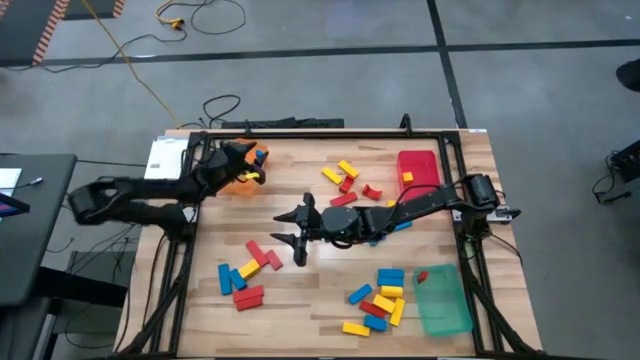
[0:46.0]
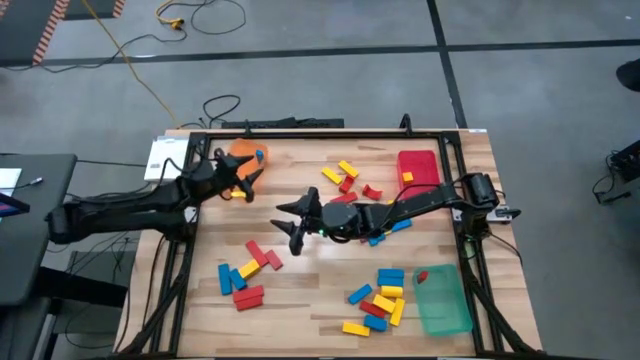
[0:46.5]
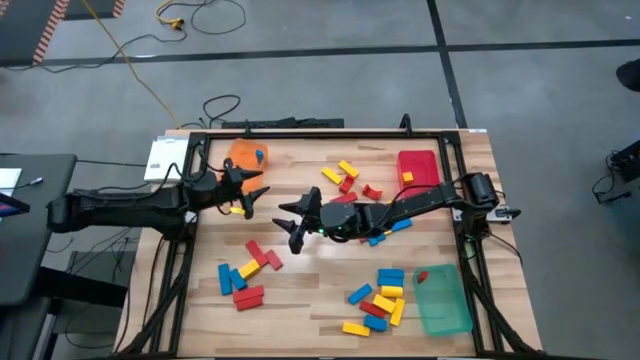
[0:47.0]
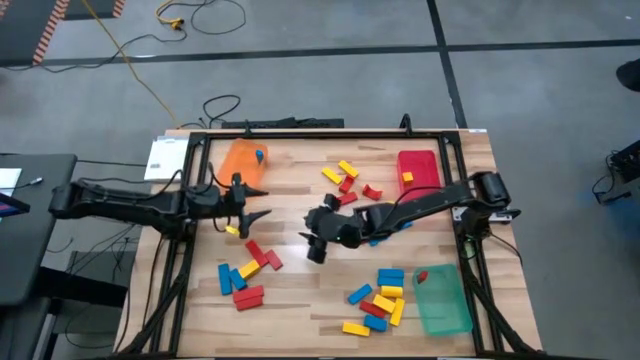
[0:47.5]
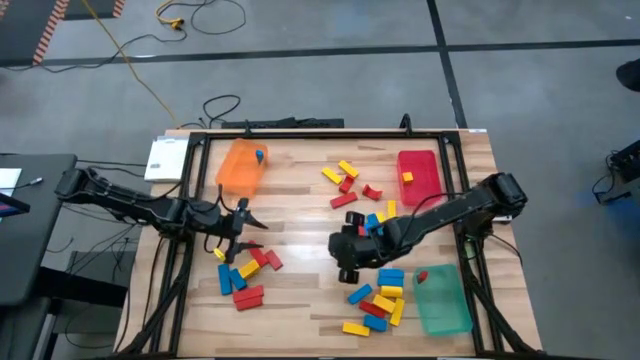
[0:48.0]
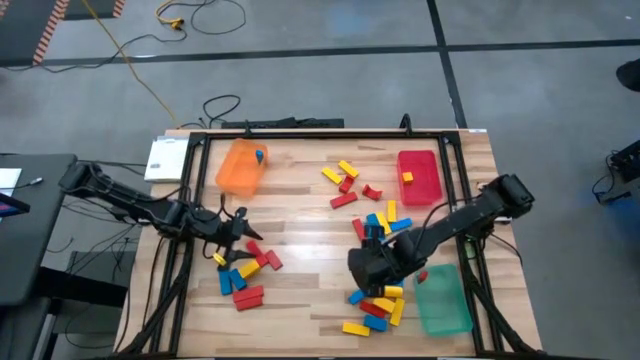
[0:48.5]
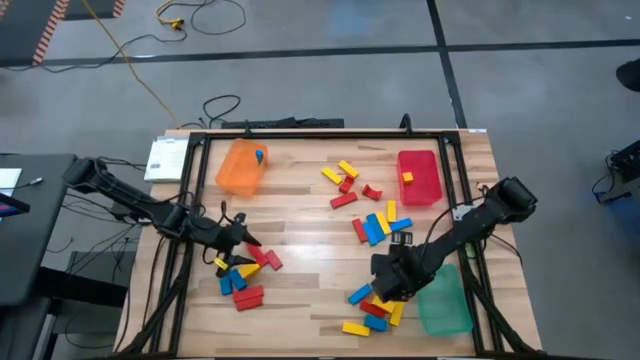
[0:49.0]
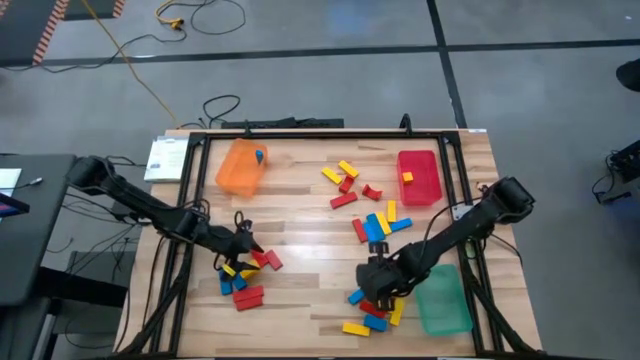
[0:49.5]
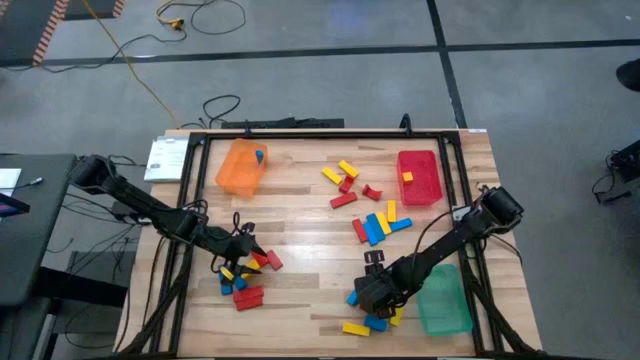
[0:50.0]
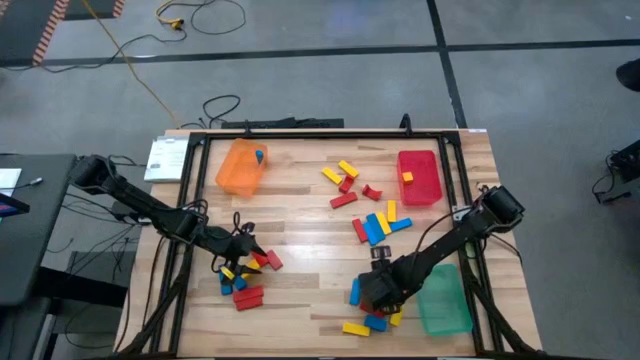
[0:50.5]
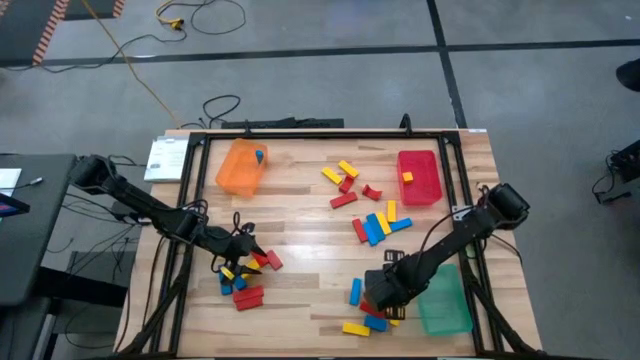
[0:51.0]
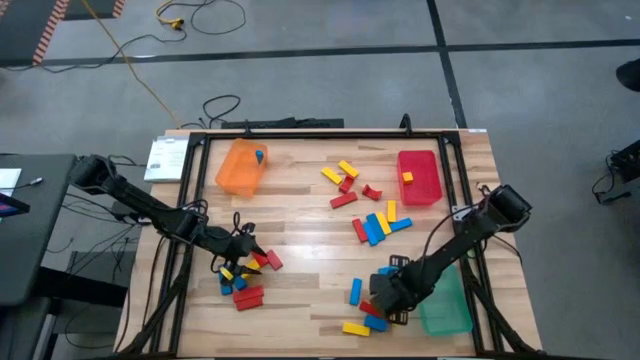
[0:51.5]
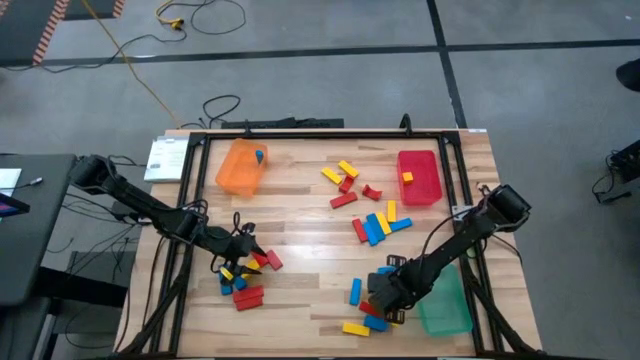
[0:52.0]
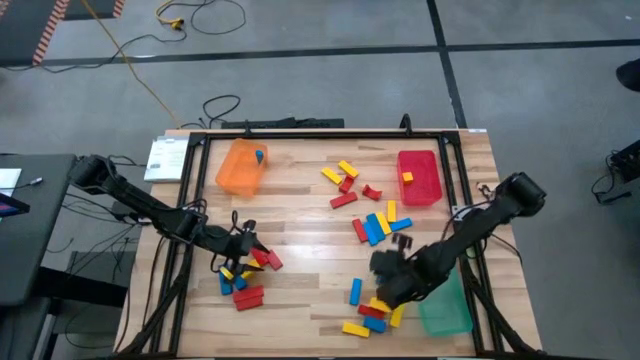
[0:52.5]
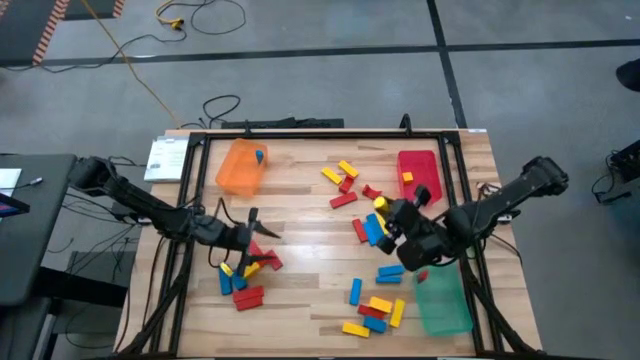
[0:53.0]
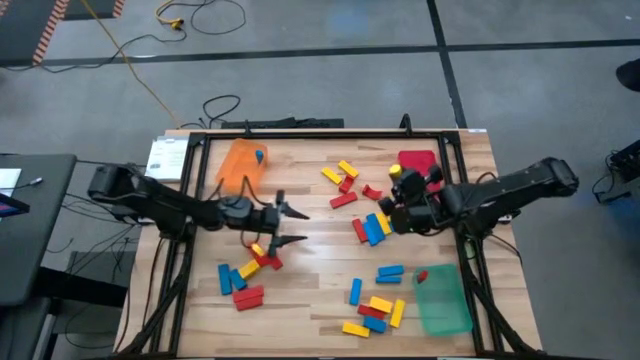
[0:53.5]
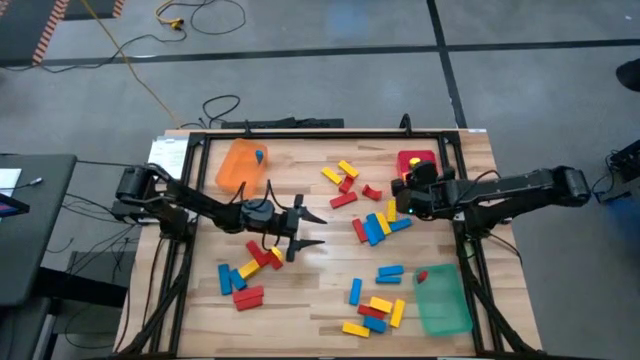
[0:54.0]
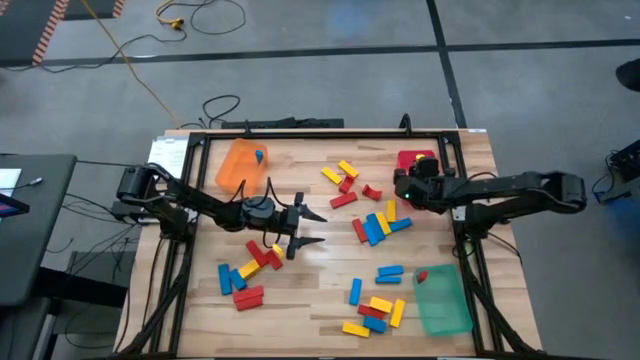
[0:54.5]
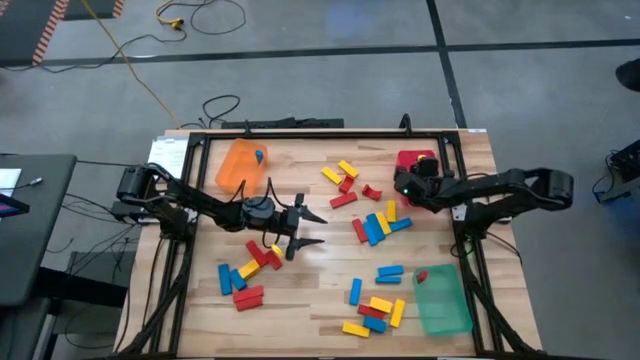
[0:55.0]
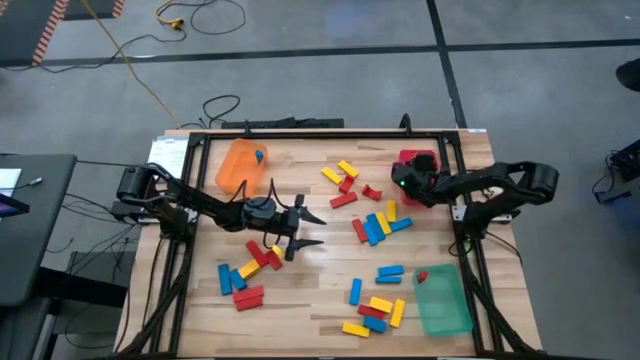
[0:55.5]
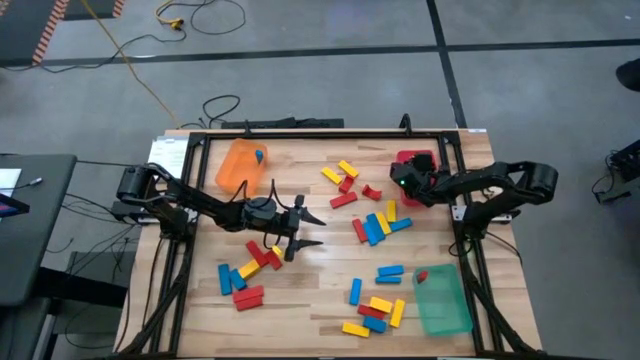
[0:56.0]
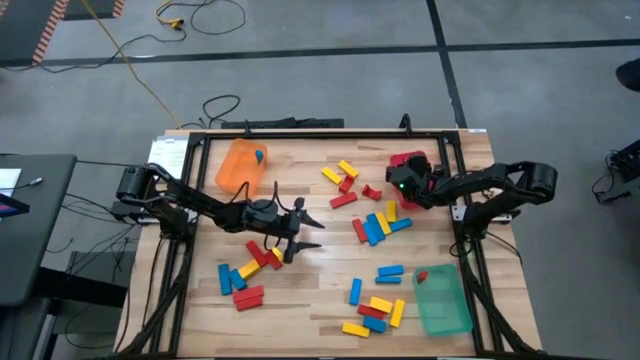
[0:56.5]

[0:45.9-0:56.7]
Task: Sort blocks
Put the yellow cylindrical block into the red bin

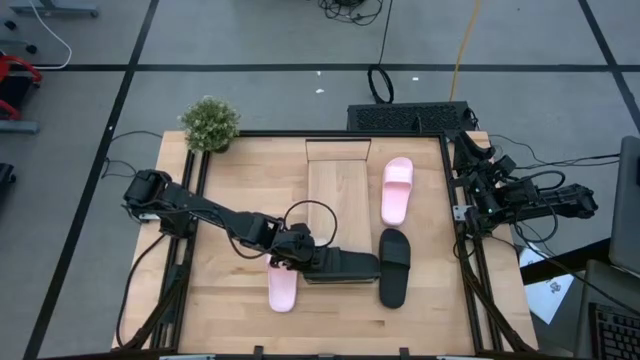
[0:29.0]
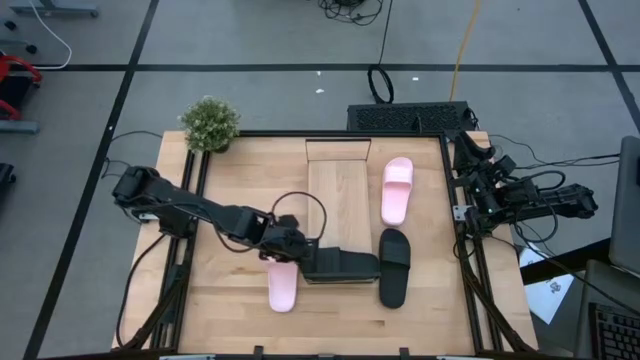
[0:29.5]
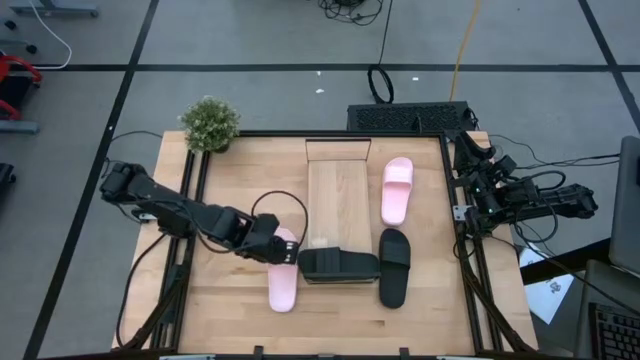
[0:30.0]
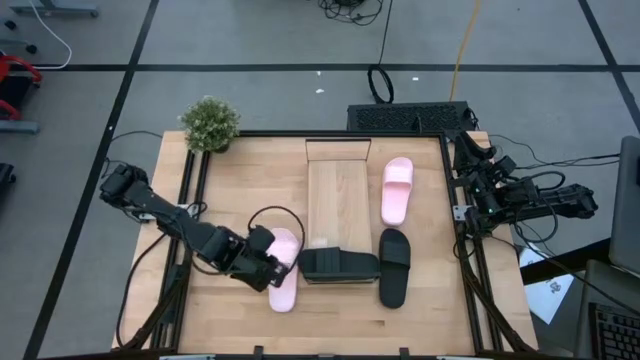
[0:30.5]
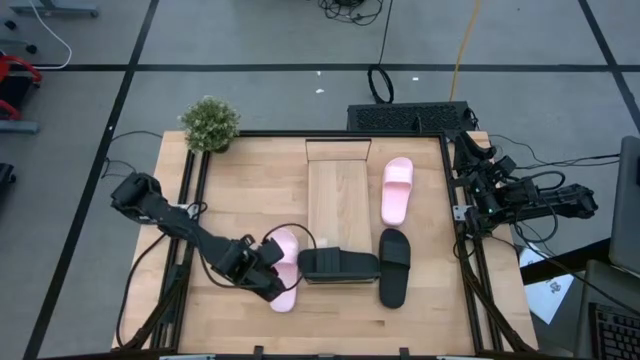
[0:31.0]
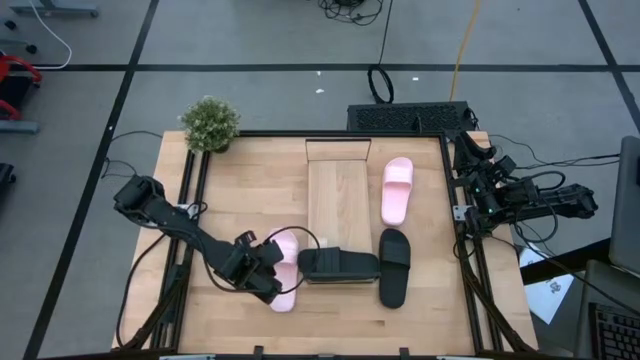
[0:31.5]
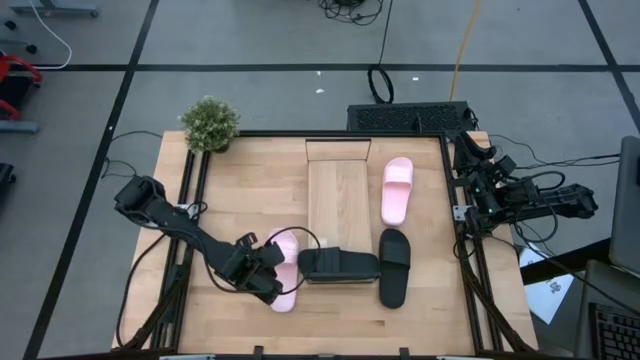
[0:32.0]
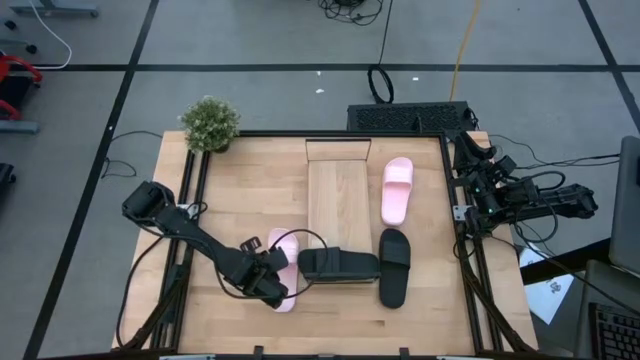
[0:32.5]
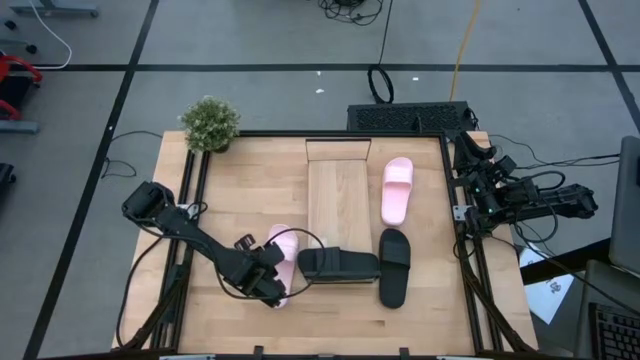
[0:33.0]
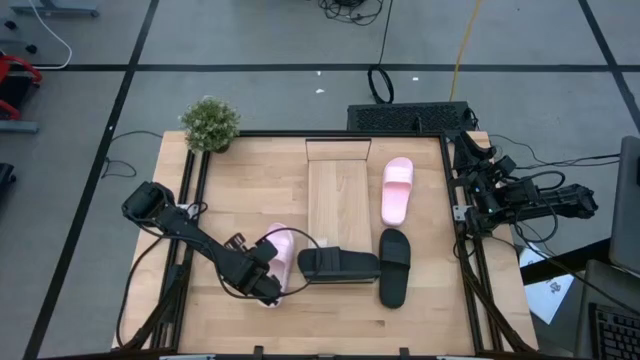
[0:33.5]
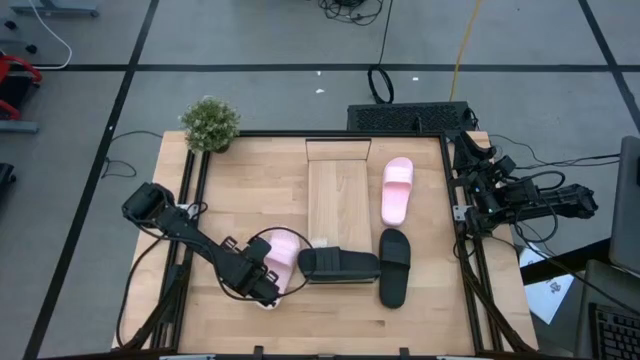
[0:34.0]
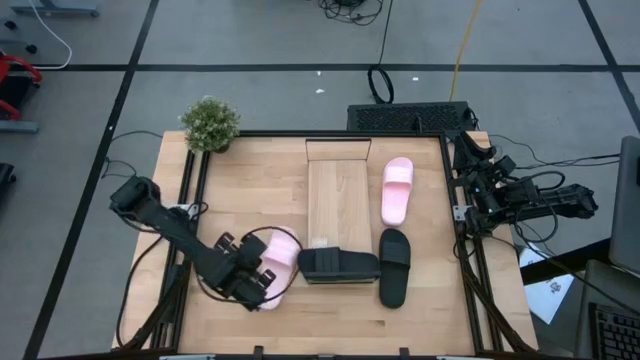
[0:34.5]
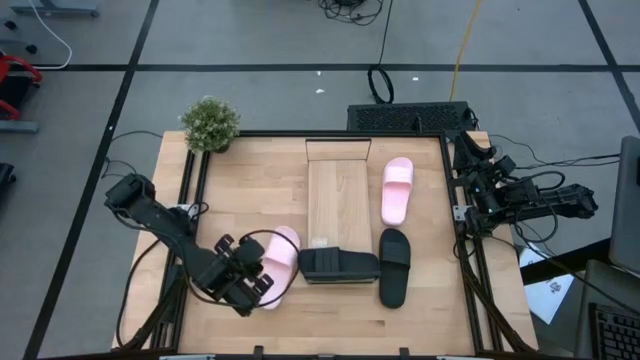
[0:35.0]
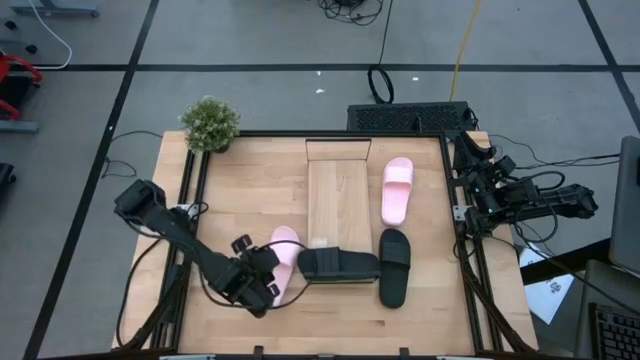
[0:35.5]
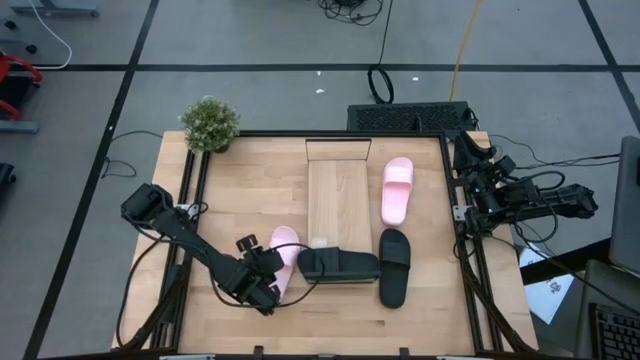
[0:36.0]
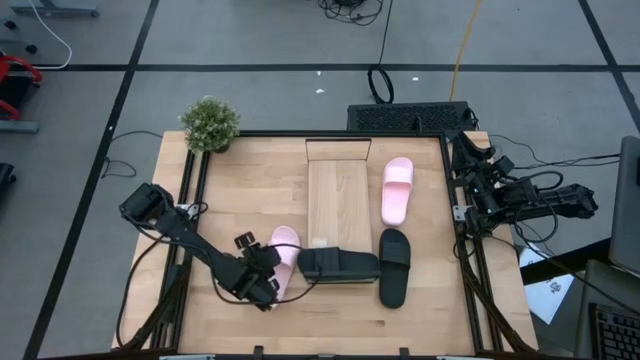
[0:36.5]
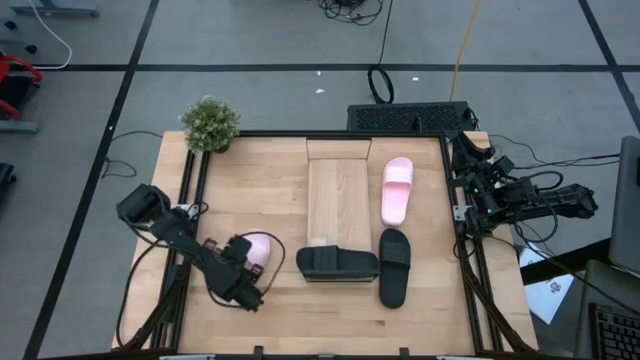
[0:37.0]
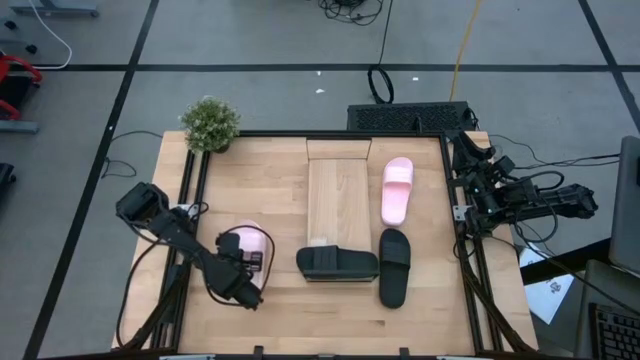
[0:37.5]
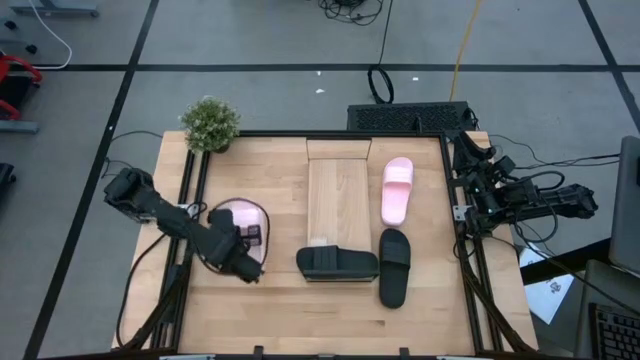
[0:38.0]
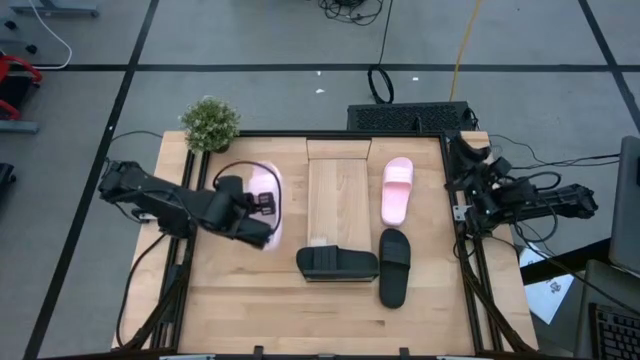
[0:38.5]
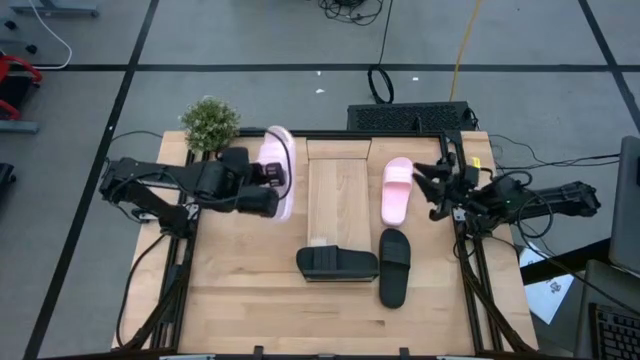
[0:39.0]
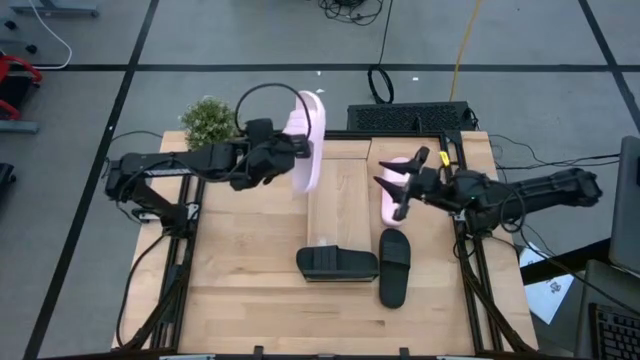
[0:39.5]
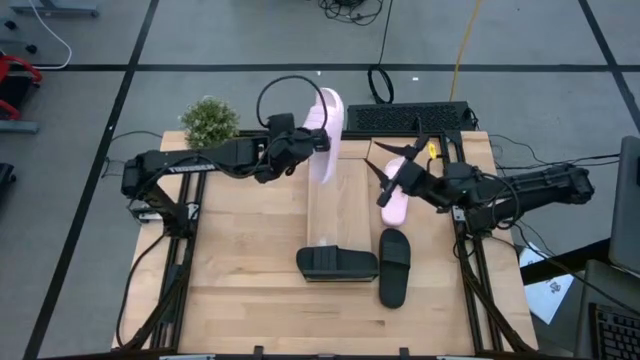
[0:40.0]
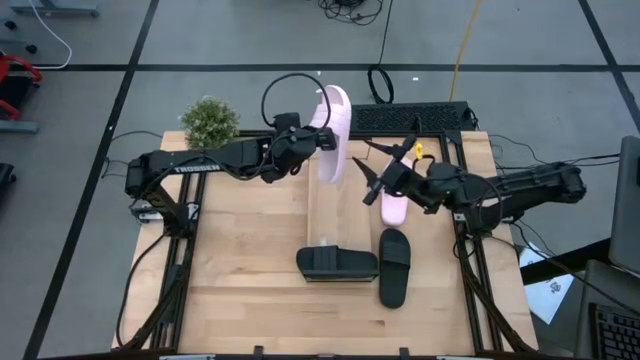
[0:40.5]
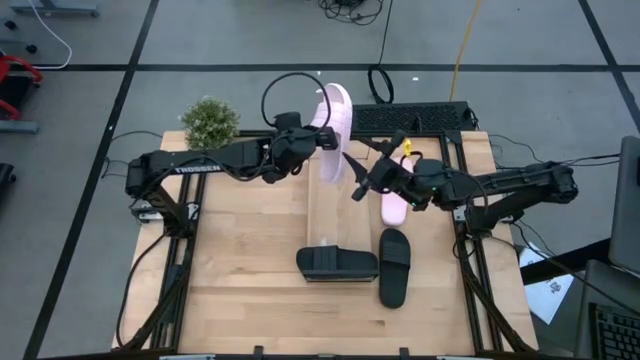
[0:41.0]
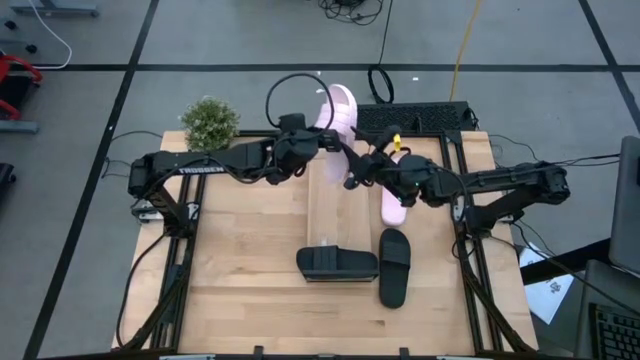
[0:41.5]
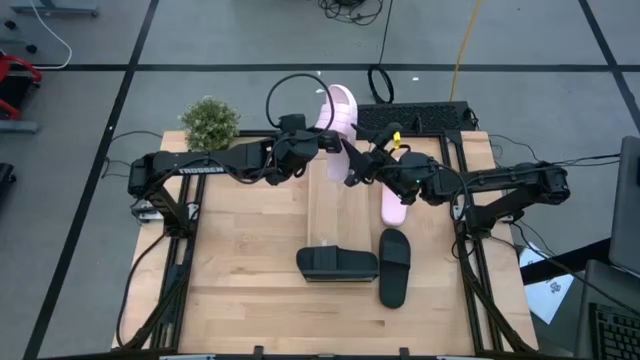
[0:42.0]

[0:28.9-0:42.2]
Task: Pick and place slides into the shelf
Put the bottom pink slipper on the shelf
